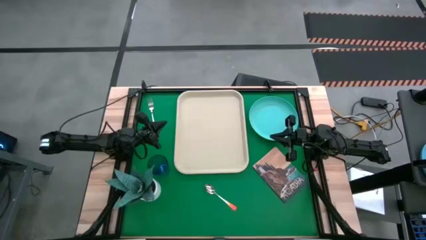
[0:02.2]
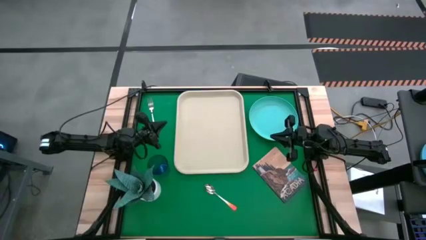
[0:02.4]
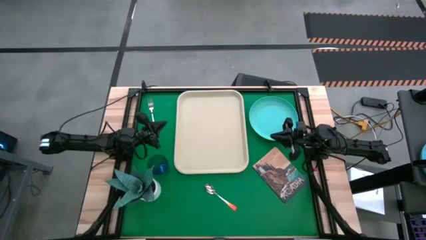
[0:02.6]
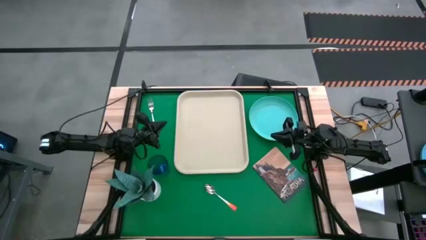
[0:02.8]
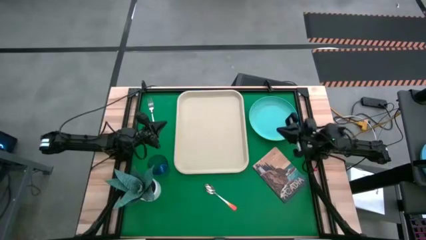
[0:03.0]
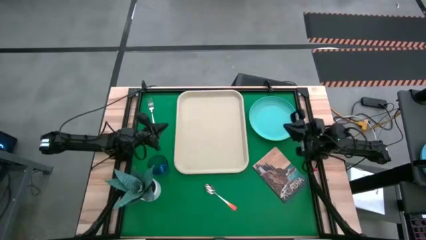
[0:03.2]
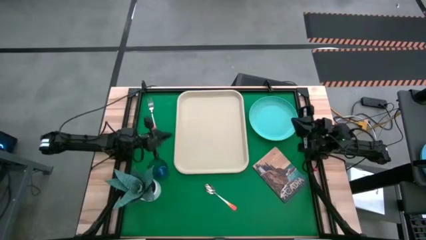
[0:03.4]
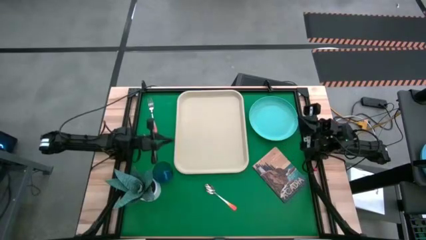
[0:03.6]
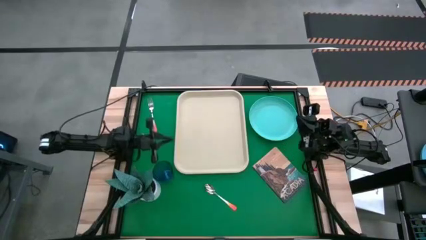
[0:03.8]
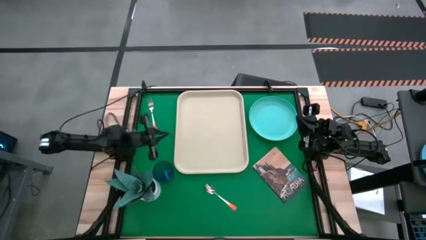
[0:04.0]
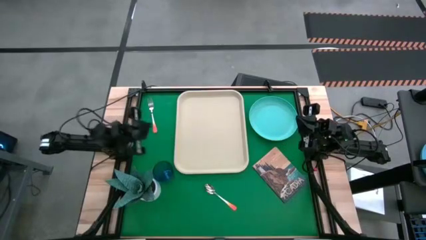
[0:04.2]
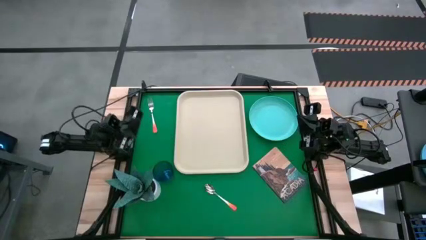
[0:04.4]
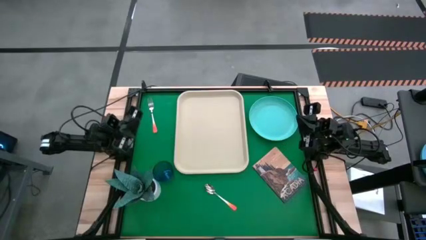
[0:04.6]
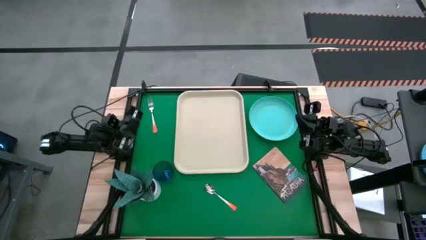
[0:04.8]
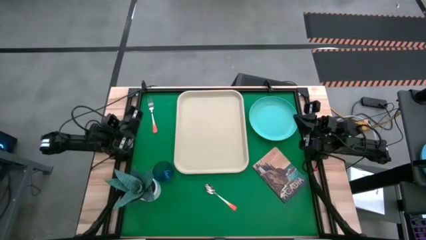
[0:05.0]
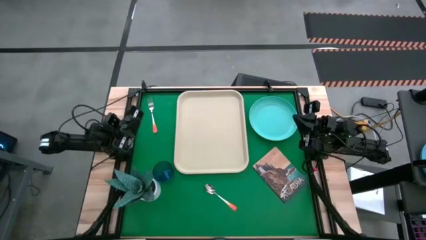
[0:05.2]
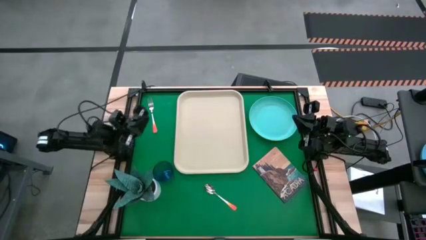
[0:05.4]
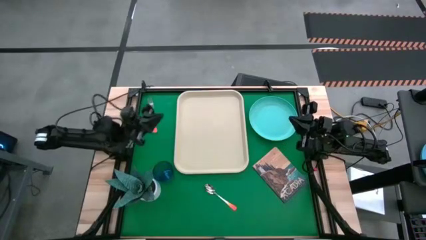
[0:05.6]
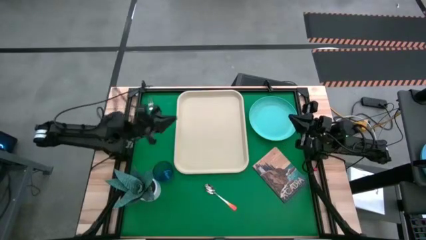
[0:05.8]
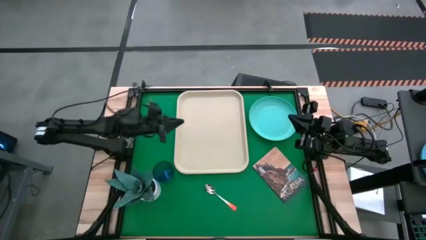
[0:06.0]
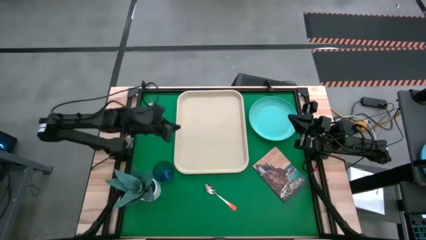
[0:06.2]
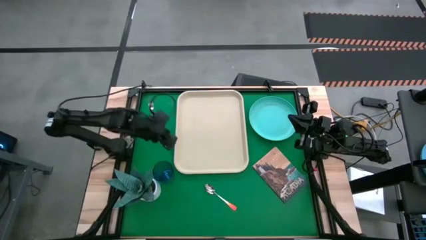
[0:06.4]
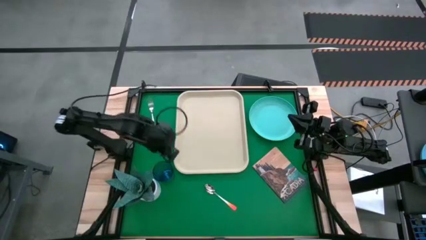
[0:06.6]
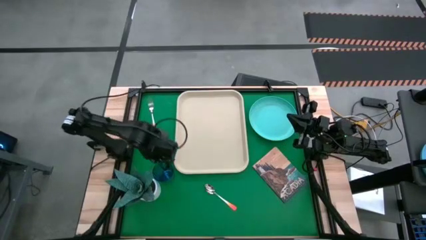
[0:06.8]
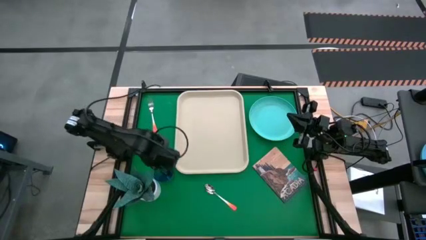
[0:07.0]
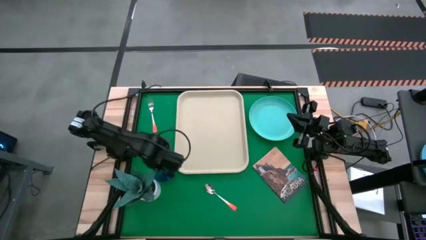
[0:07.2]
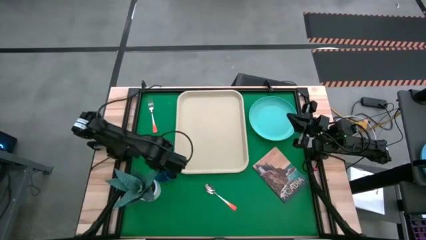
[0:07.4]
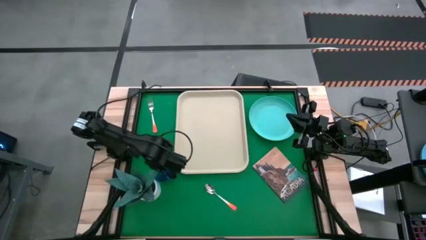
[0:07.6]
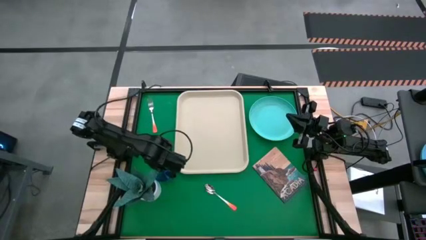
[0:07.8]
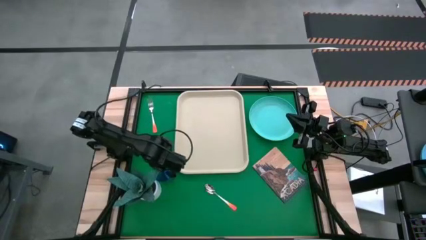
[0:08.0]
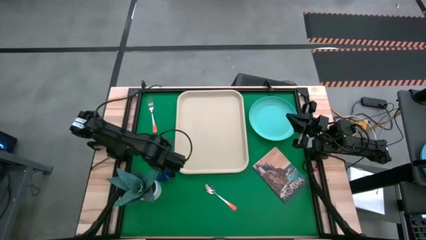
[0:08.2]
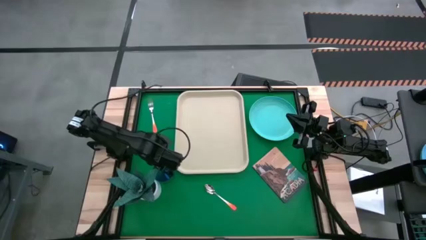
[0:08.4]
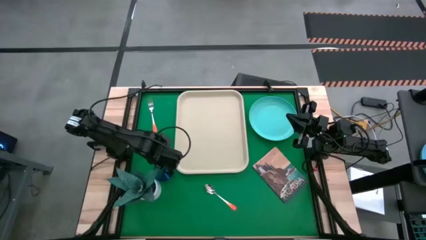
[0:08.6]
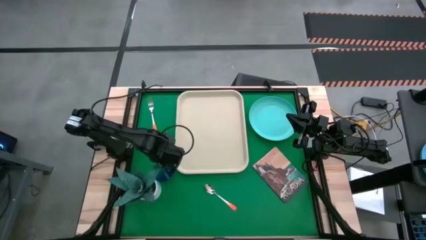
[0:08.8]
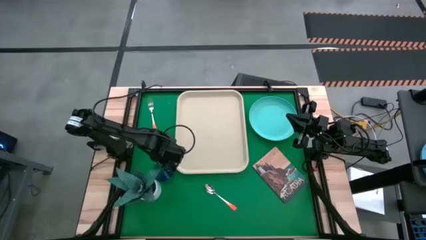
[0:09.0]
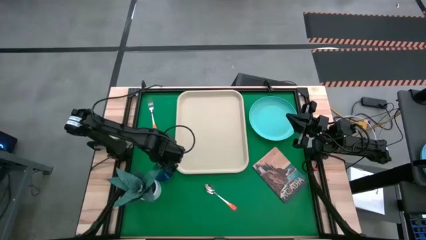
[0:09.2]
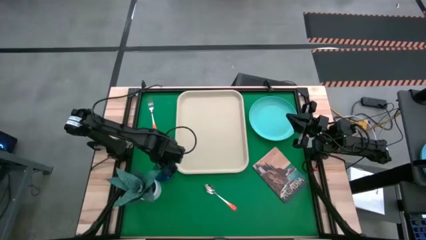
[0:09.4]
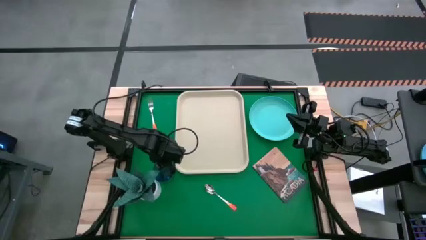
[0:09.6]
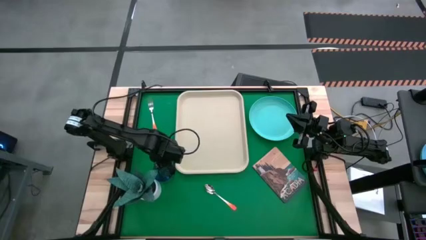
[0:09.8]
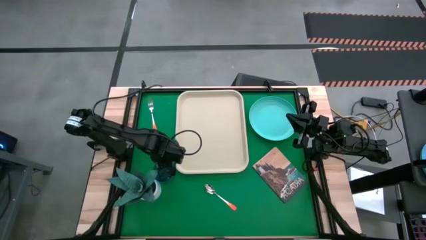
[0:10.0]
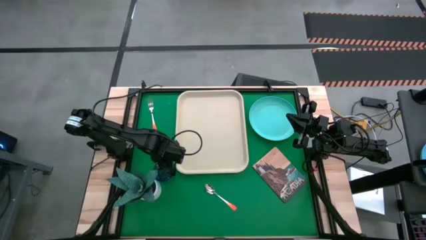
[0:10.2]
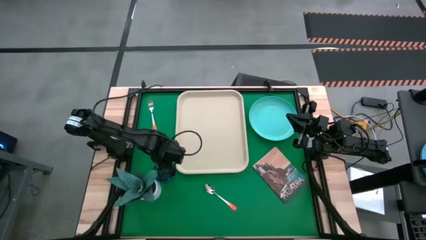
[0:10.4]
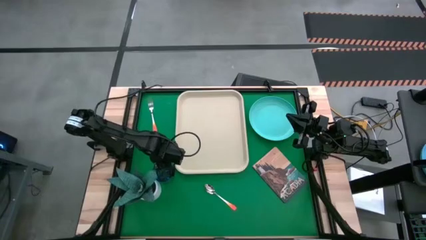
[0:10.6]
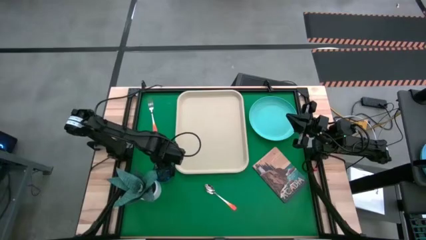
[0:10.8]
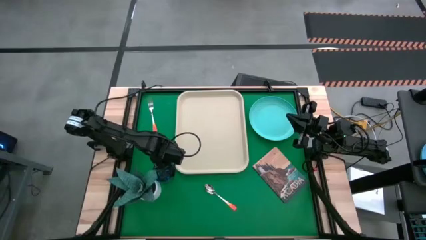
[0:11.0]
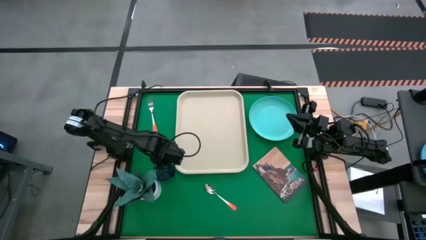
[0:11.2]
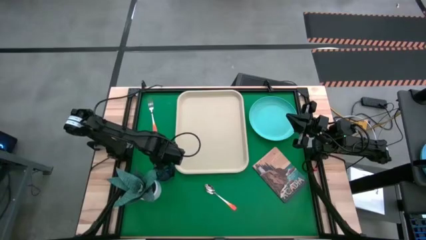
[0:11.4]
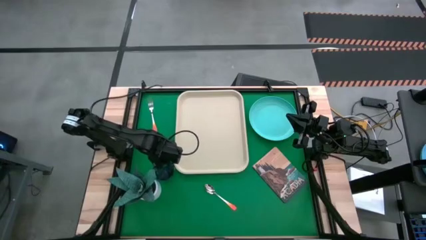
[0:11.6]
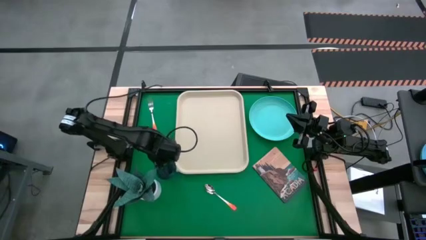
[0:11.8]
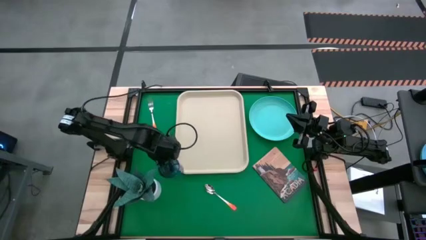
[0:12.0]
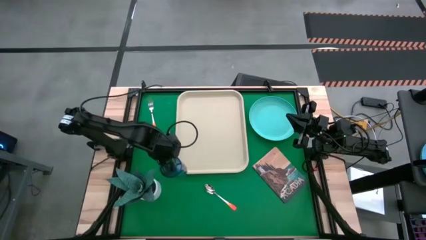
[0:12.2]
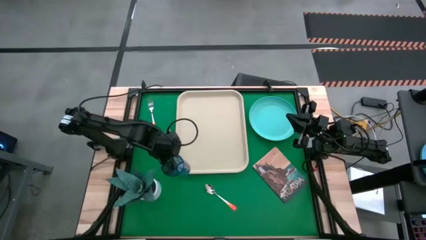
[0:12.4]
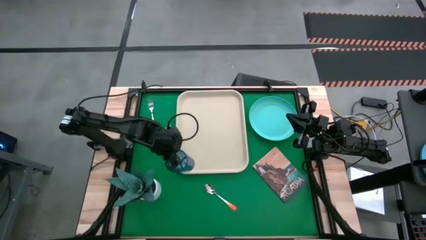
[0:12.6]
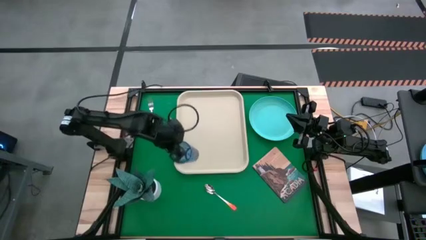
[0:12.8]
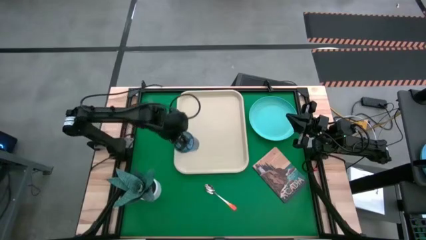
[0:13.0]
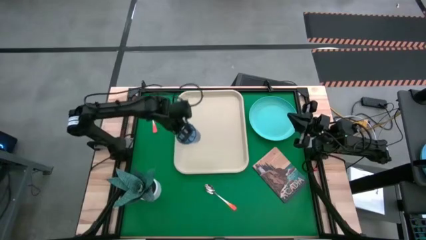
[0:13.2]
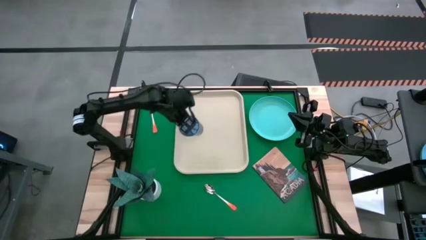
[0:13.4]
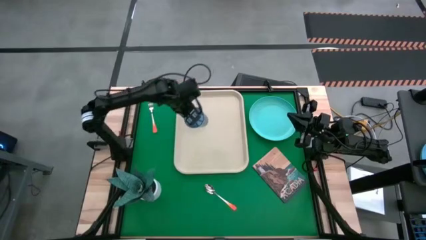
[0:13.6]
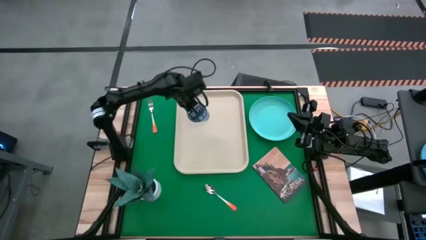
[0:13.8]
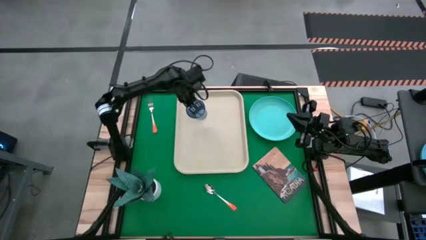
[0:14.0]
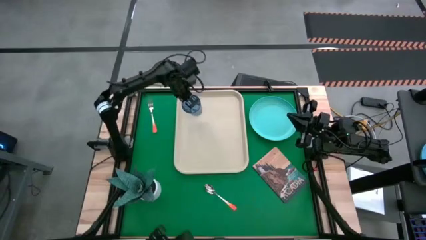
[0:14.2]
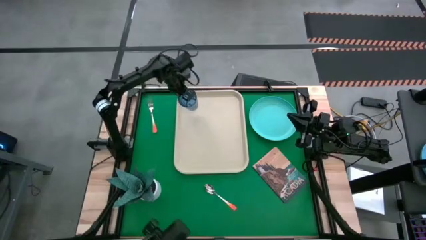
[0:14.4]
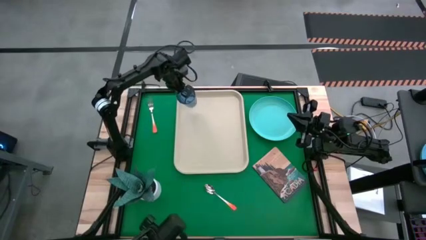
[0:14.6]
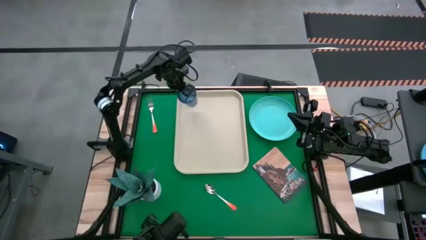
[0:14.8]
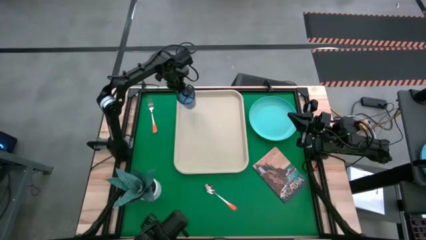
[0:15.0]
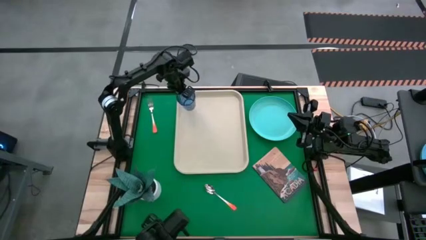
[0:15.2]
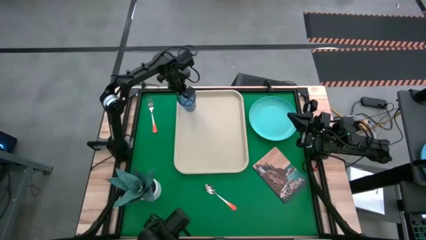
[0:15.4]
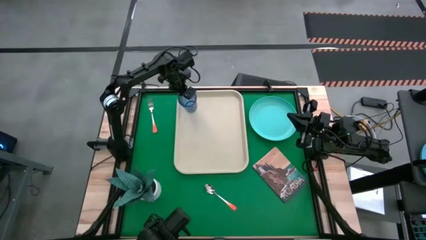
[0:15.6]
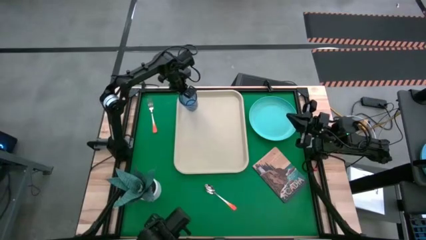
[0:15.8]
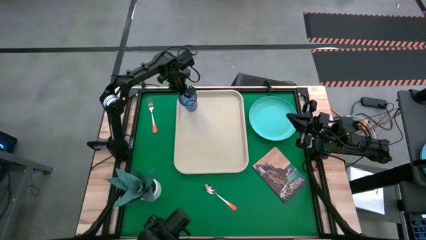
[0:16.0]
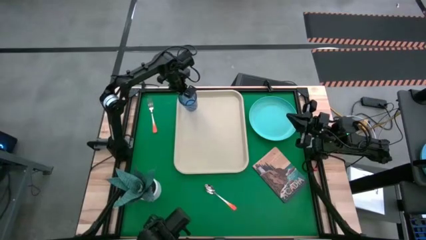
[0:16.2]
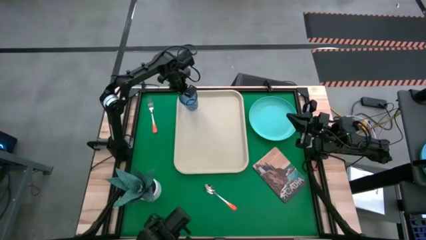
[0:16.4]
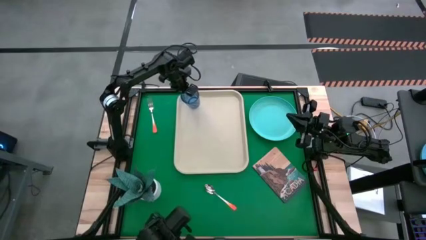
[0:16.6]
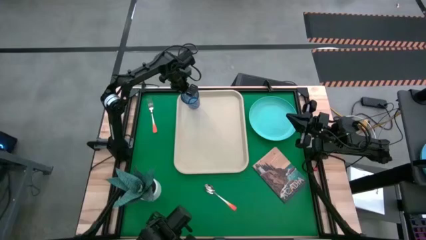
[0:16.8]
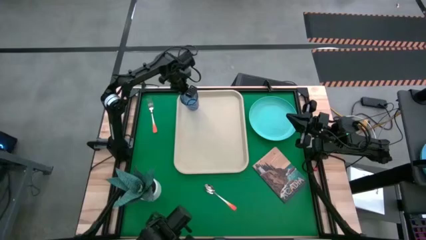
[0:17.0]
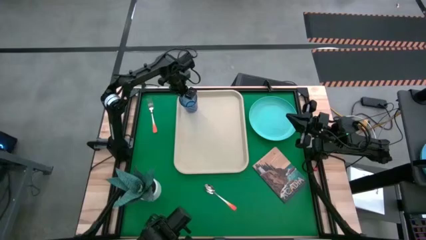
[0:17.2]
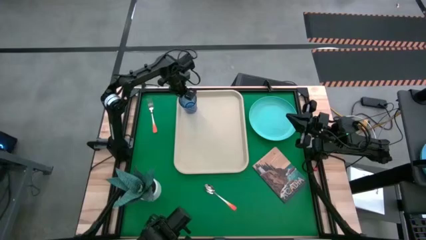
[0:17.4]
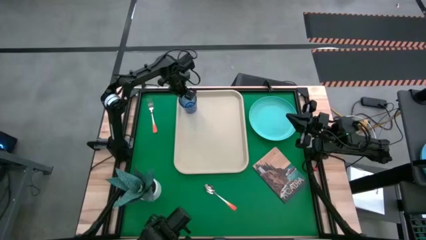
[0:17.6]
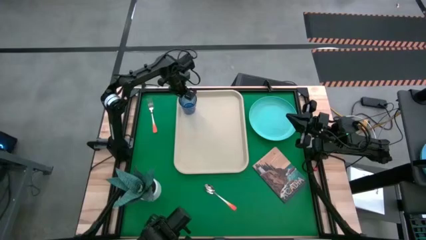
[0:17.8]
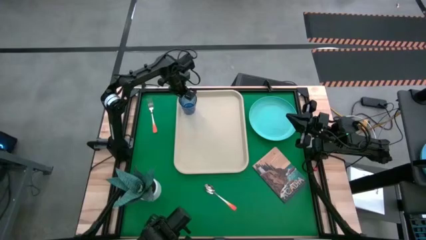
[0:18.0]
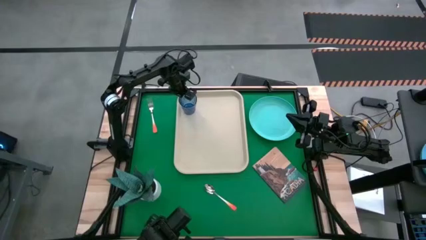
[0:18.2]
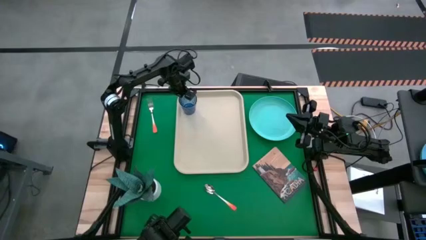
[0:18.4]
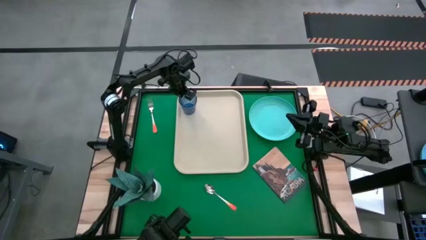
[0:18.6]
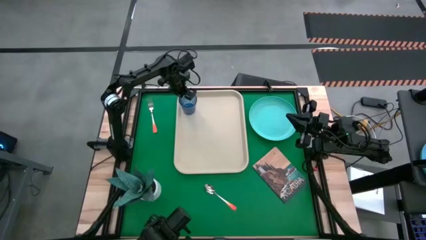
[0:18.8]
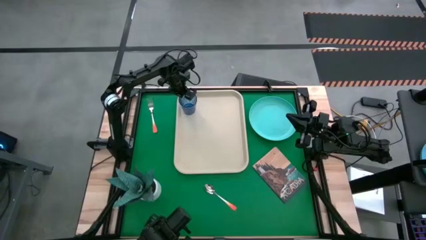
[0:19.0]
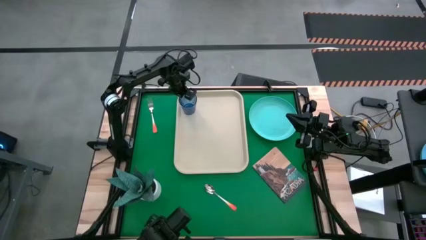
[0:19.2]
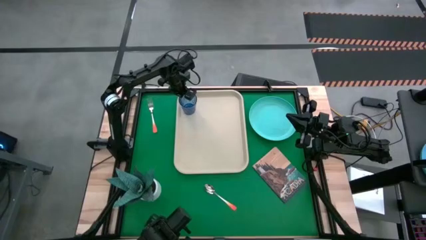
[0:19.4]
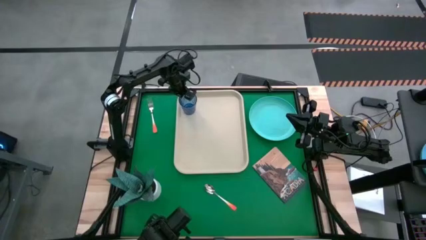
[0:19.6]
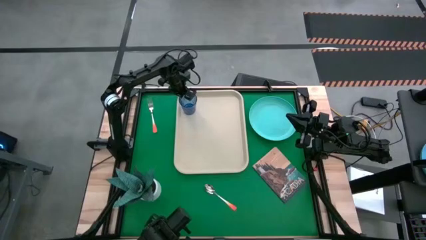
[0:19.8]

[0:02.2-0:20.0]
Task: Pick and place plate/cup/fork/spoon on tray
Put the blue cup on the top right of the white serving tray
